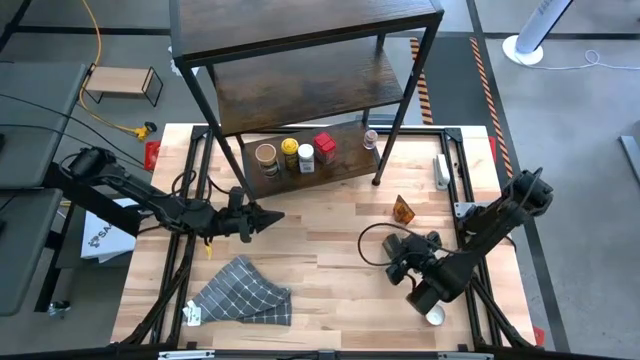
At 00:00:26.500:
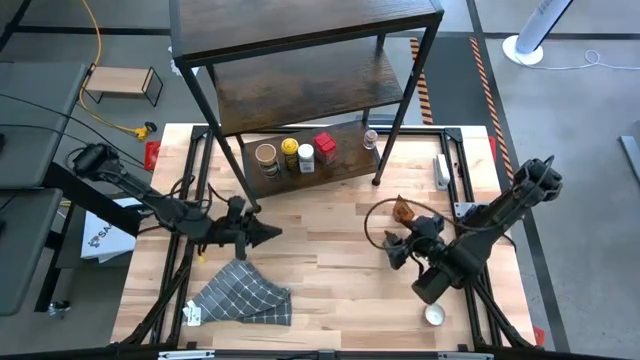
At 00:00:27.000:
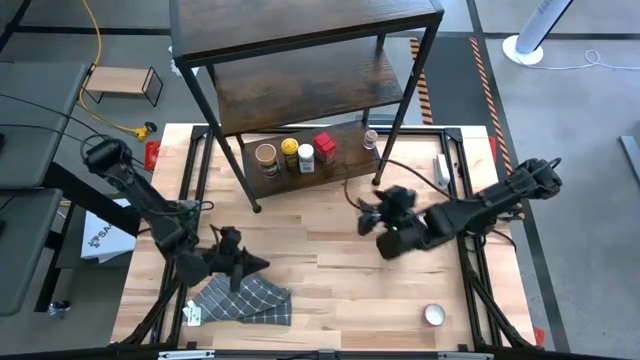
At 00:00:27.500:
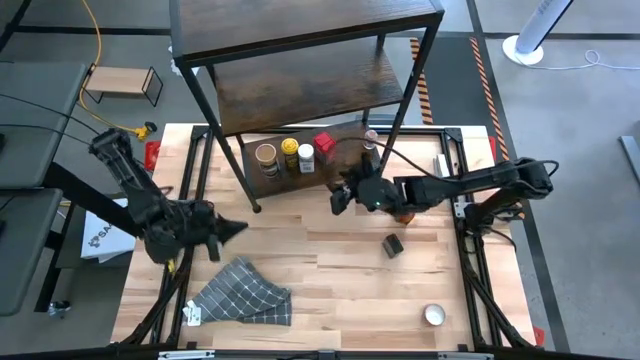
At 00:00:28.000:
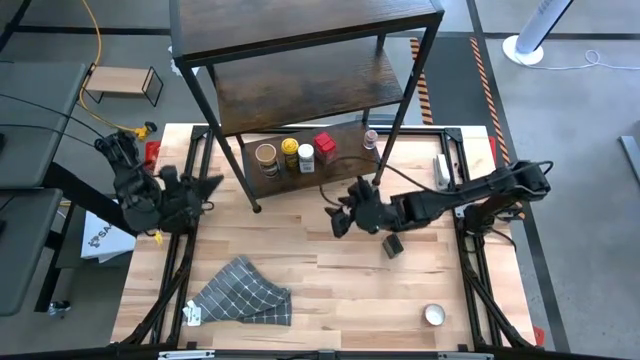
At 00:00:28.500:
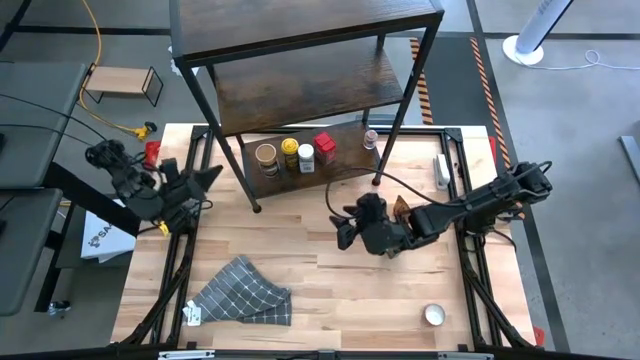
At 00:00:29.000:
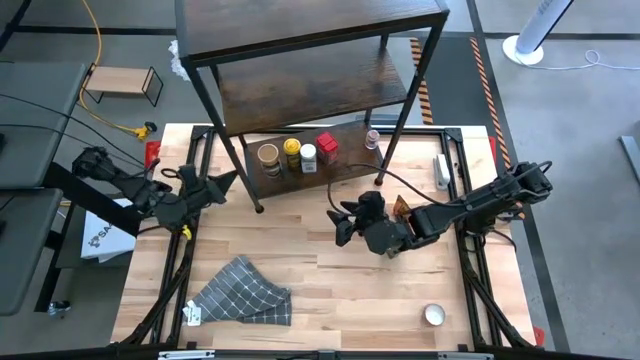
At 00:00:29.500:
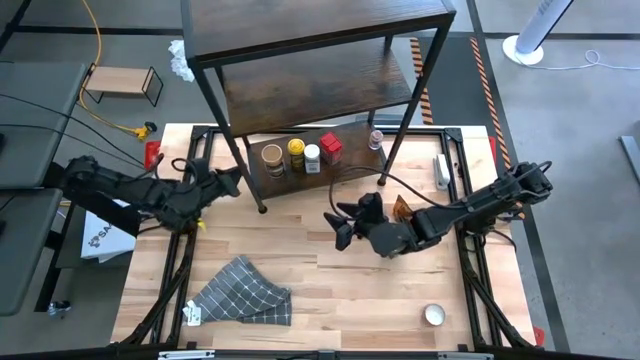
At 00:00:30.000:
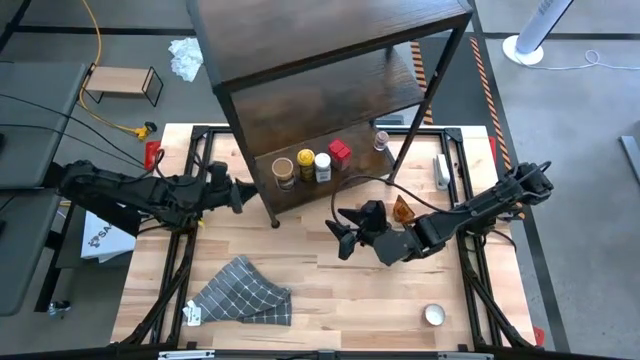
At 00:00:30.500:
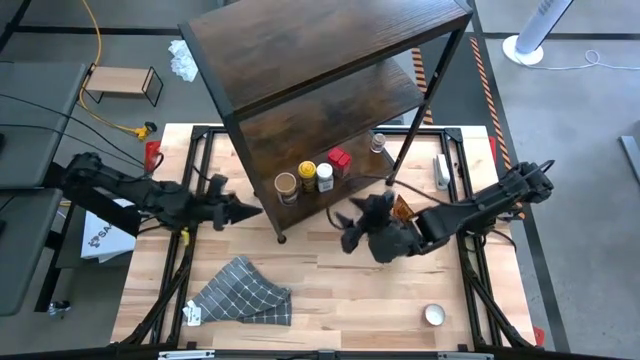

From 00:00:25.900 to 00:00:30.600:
Task: Shelf spices
Adjust the shelf

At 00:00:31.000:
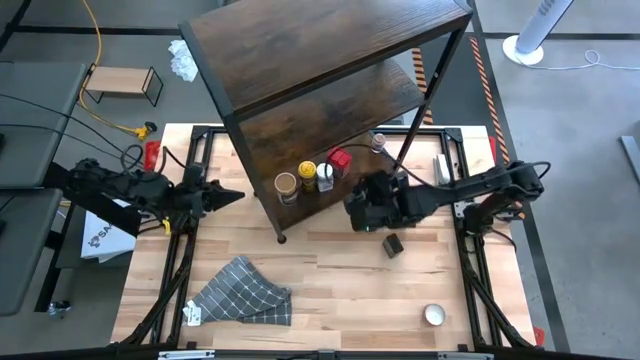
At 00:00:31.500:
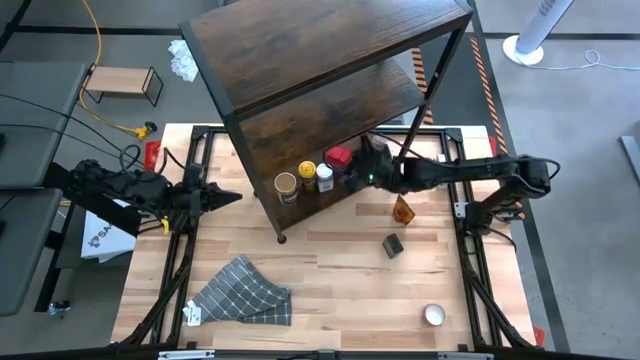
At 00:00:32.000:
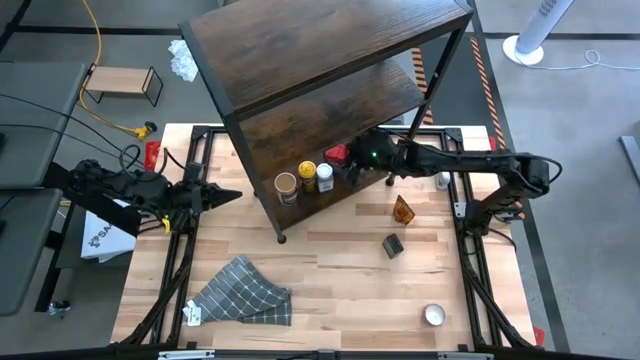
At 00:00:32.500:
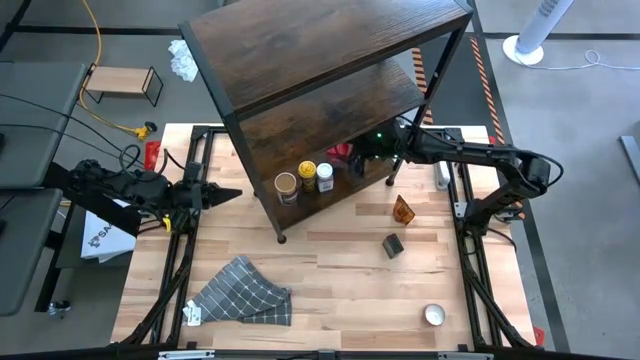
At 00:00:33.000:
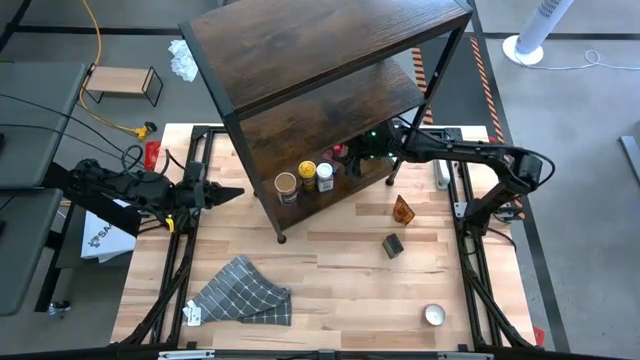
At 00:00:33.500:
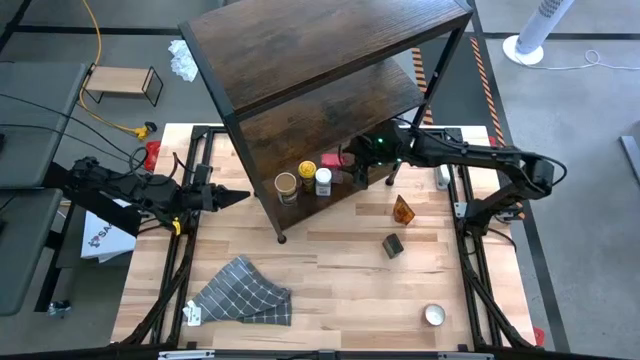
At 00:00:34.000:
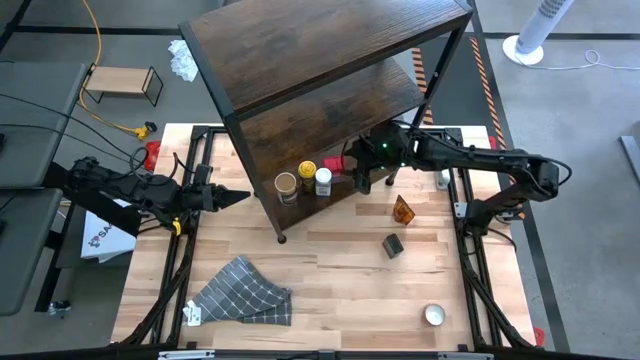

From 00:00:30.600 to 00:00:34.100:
Remove the red seasoning can from the shelf

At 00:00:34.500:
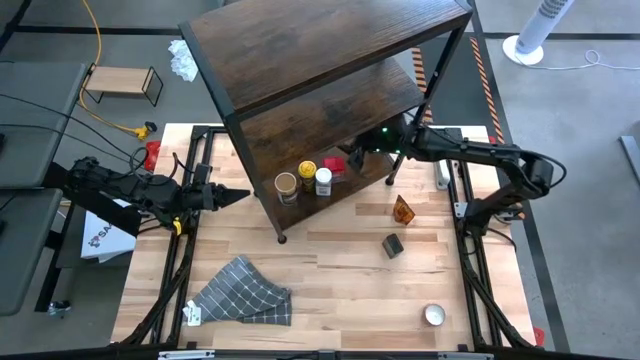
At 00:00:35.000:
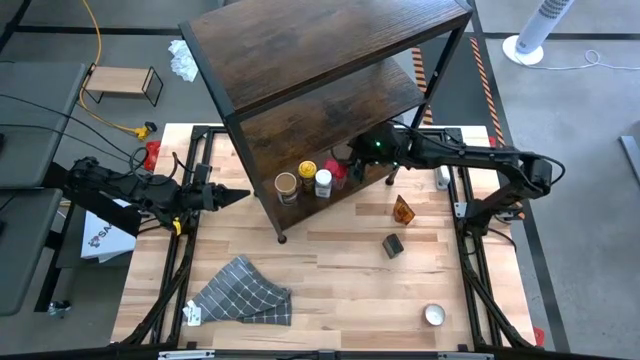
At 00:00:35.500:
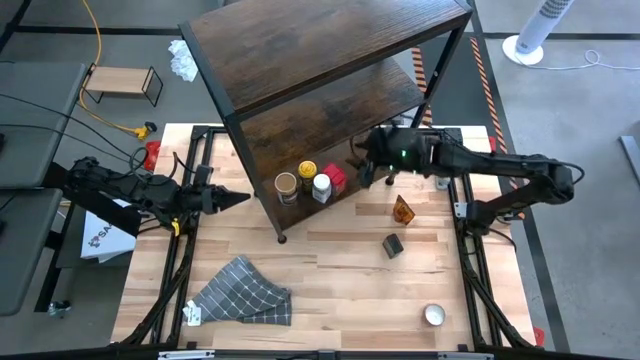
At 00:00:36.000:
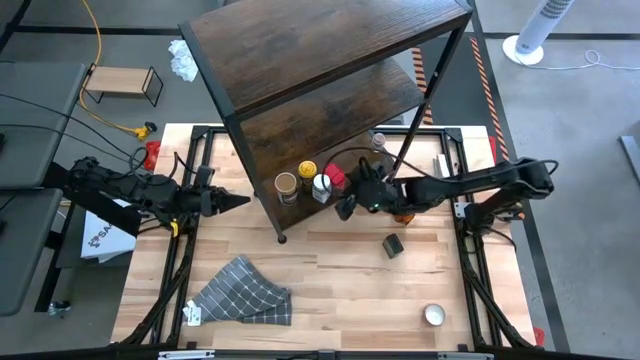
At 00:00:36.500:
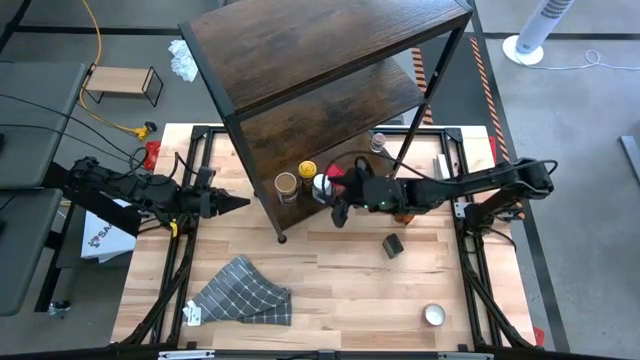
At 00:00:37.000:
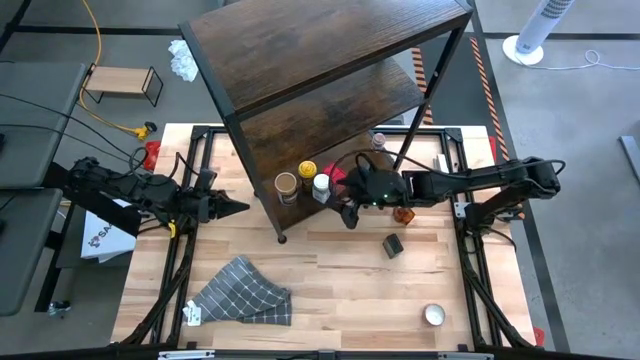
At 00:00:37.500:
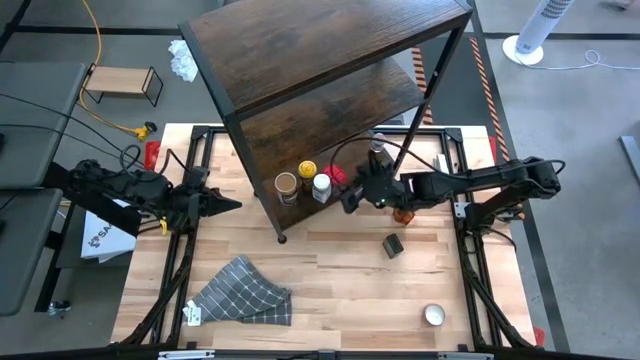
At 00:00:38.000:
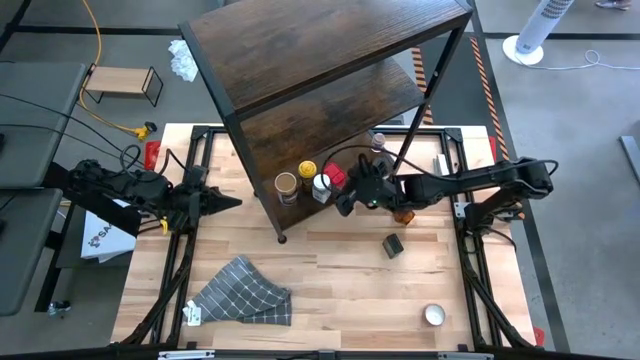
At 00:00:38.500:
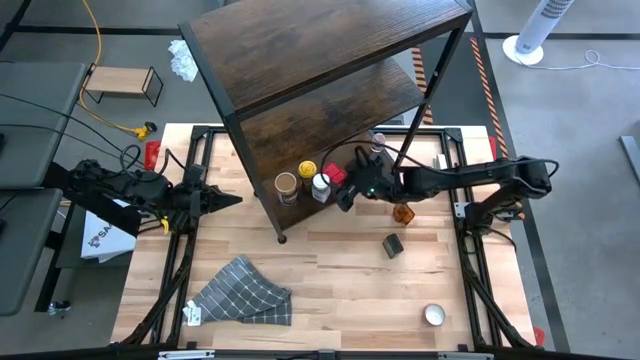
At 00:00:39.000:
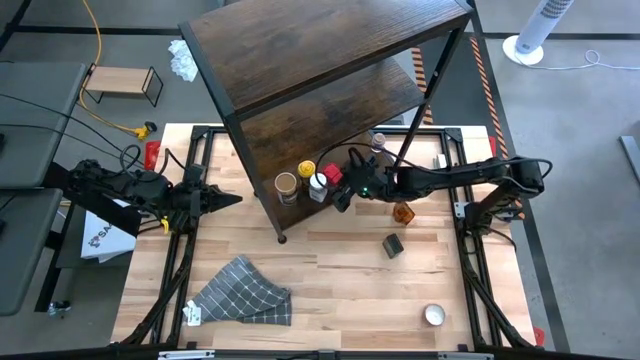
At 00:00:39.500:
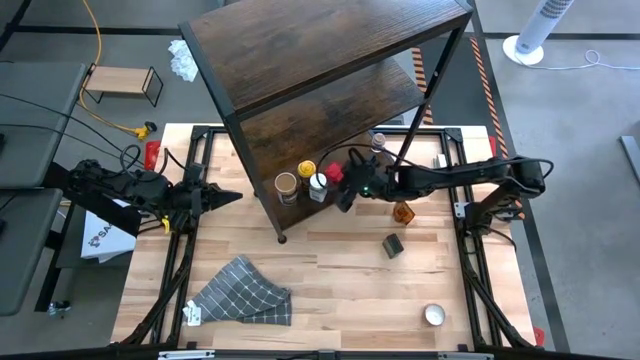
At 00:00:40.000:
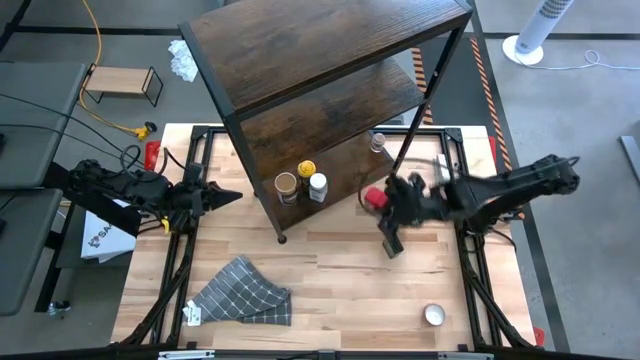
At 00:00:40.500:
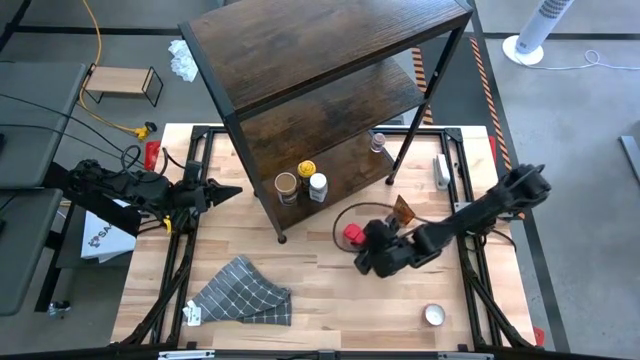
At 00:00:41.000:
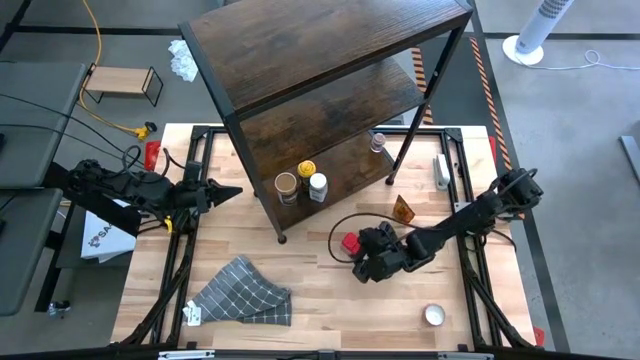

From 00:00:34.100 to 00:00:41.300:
Remove the red seasoning can from the shelf

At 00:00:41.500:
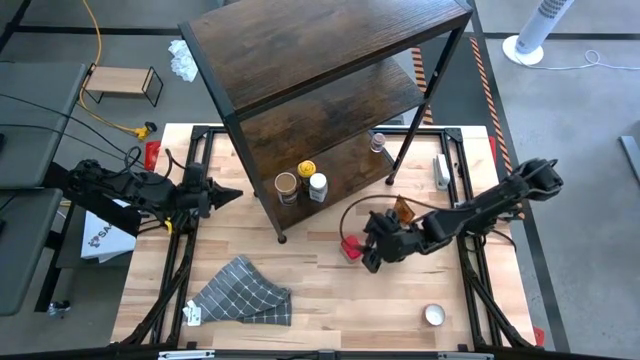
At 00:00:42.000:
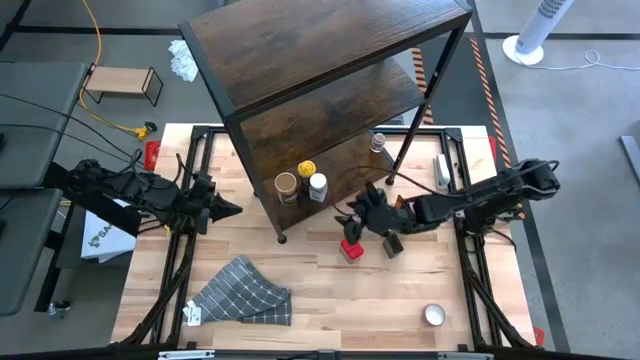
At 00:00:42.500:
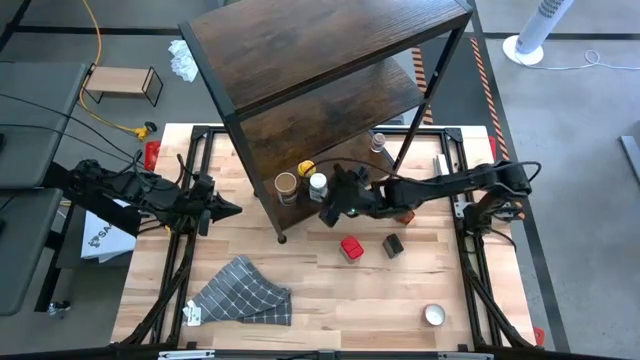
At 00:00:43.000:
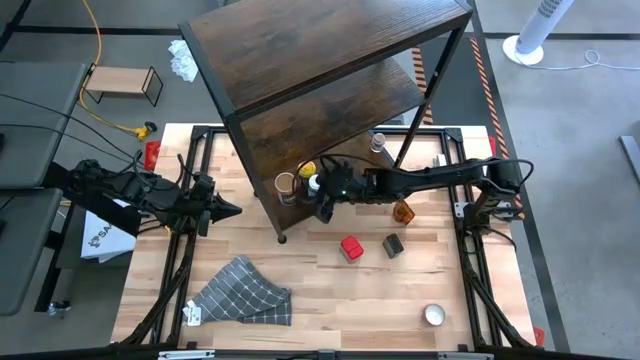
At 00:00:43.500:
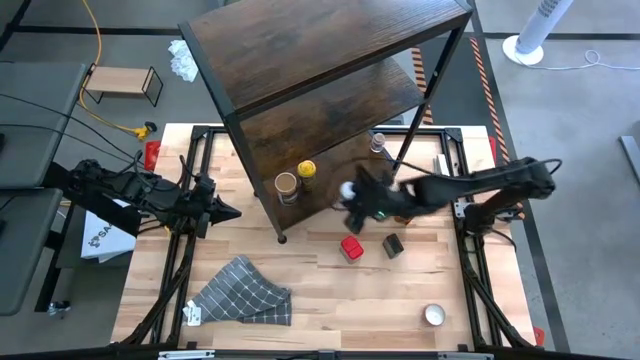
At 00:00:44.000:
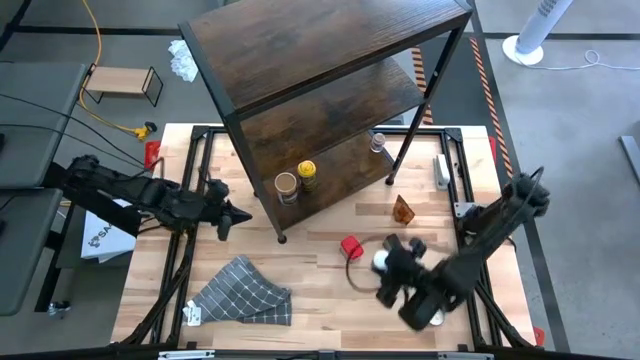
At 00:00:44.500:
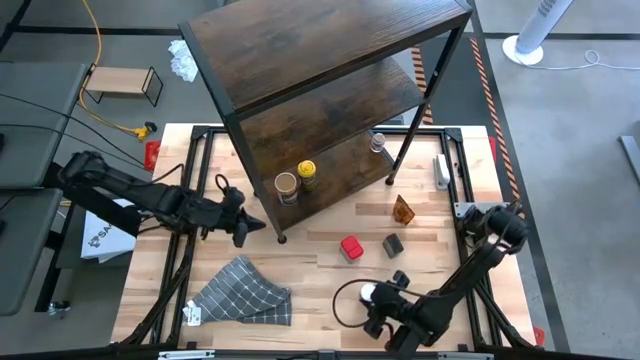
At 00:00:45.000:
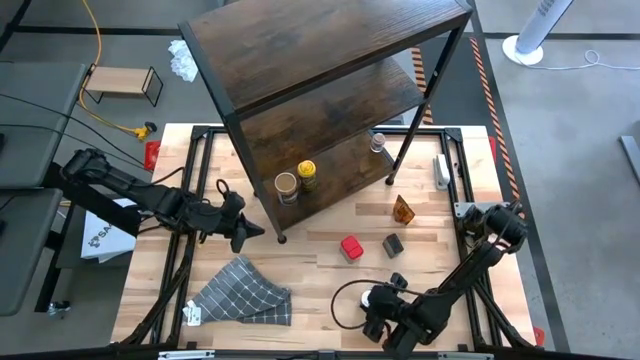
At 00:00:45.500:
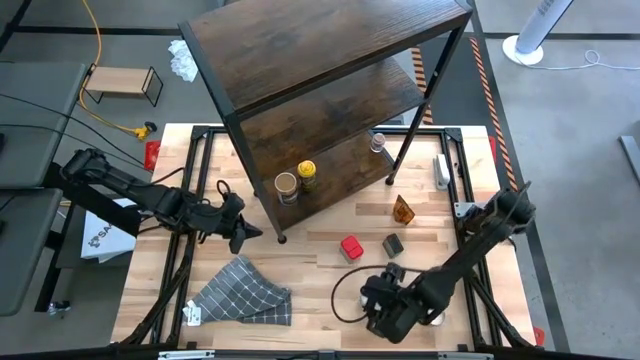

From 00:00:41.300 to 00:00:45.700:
Remove the white seasoning bottle from the shelf
